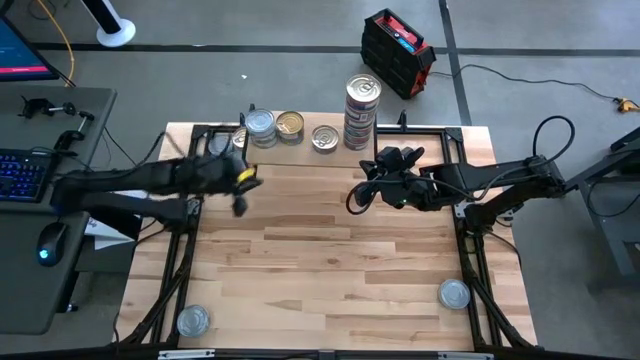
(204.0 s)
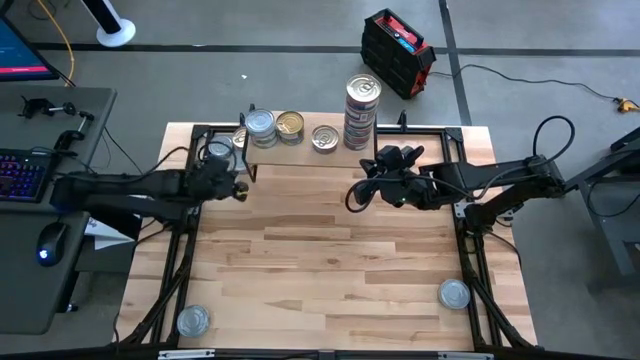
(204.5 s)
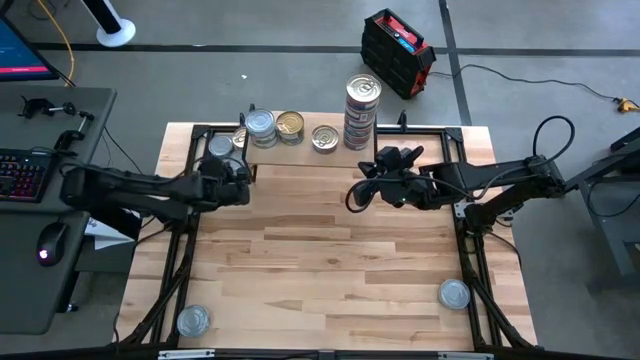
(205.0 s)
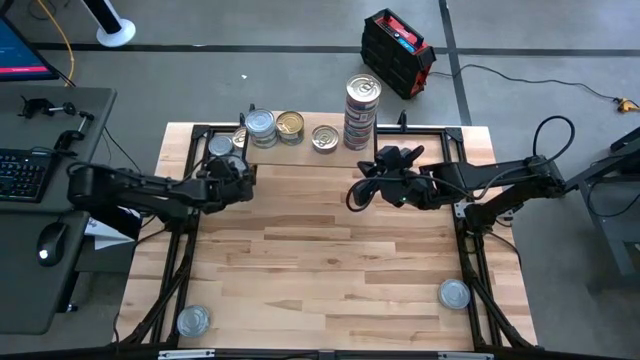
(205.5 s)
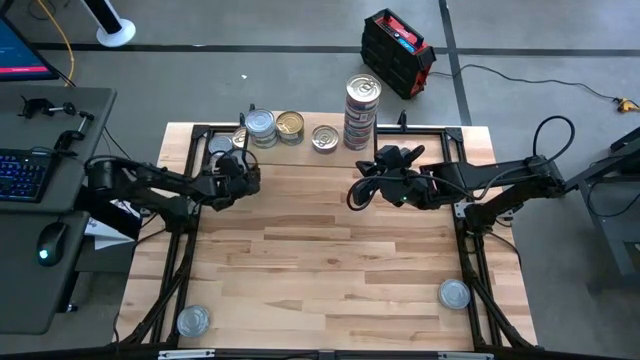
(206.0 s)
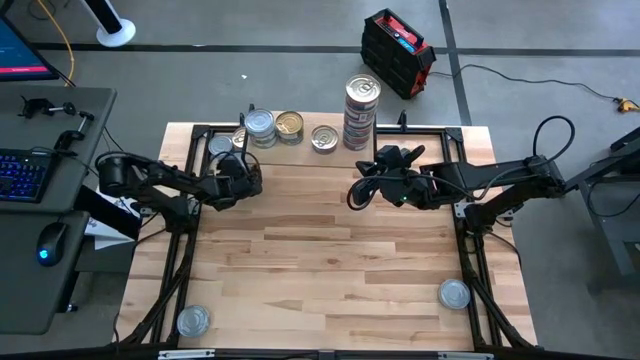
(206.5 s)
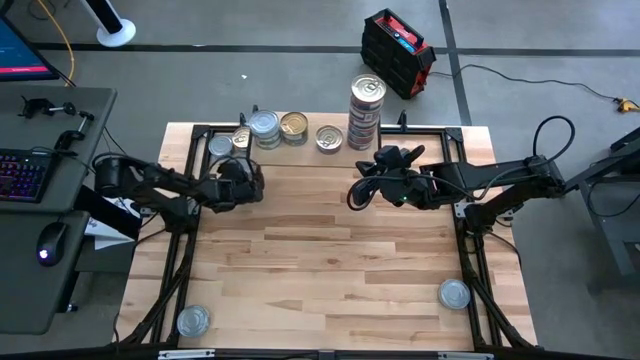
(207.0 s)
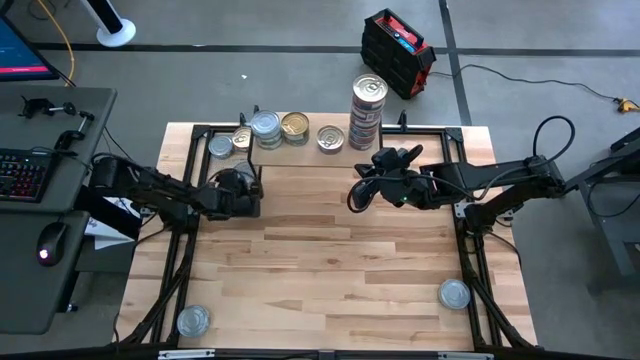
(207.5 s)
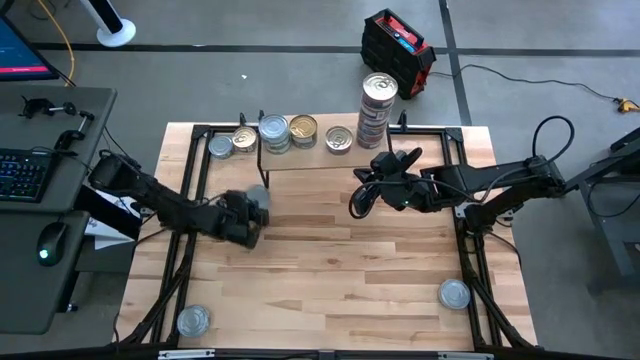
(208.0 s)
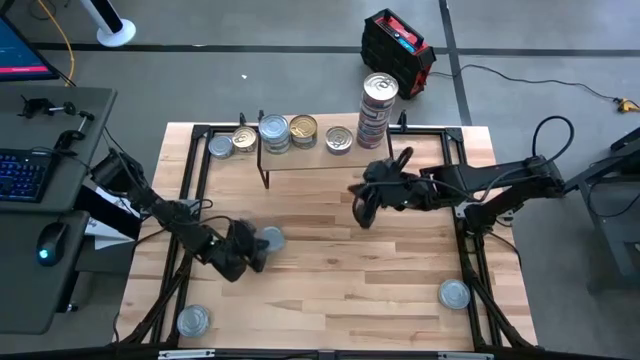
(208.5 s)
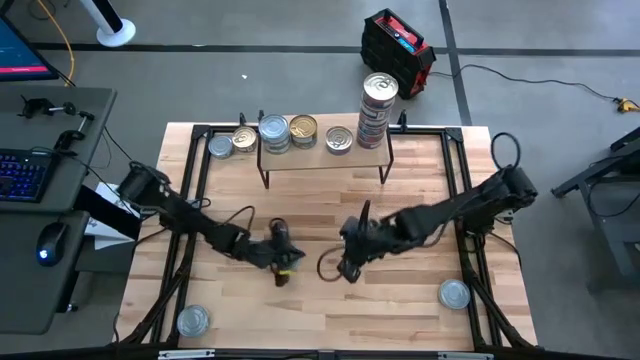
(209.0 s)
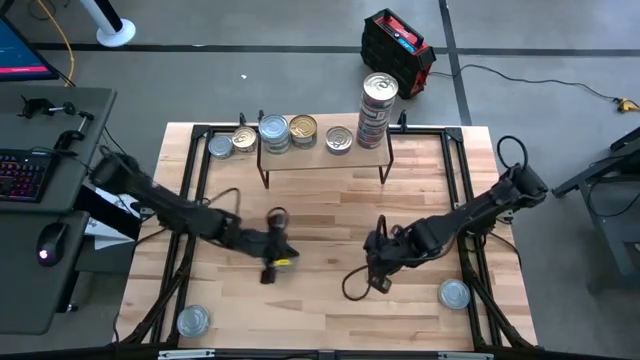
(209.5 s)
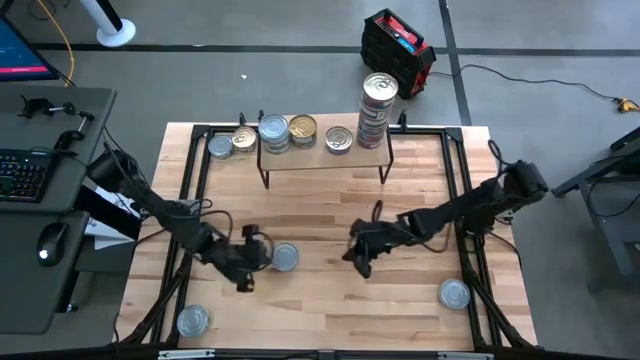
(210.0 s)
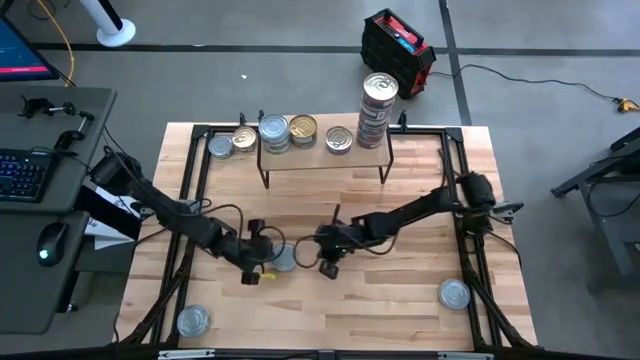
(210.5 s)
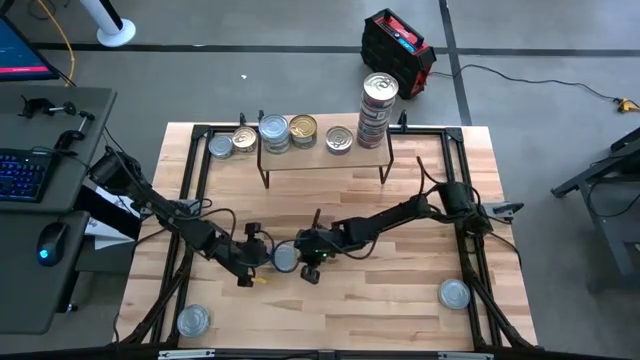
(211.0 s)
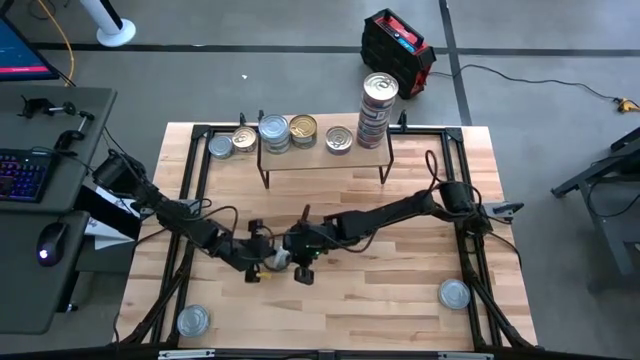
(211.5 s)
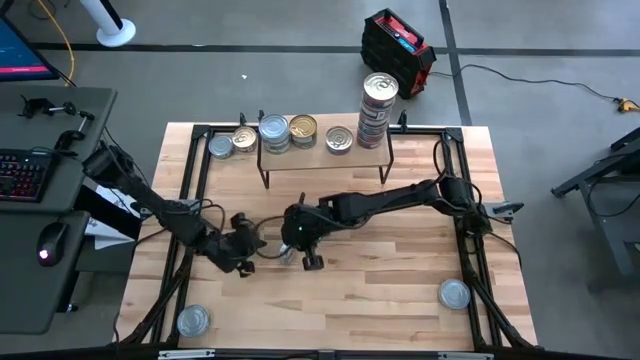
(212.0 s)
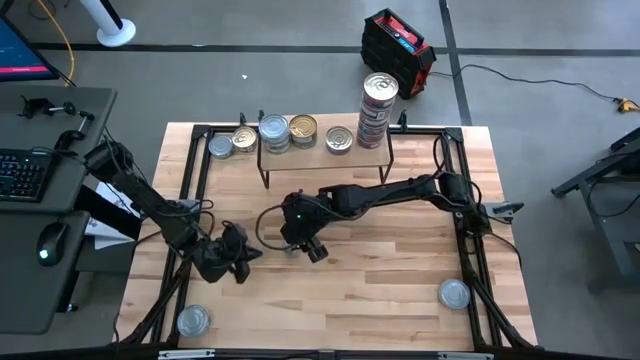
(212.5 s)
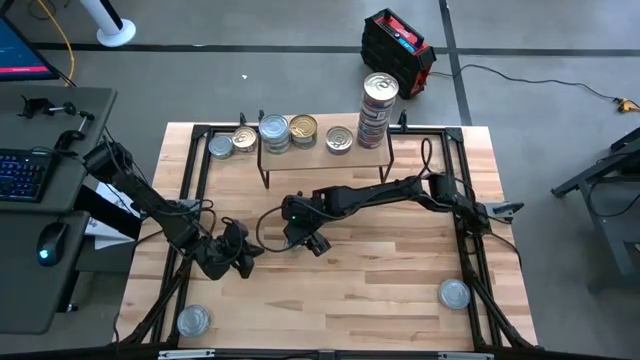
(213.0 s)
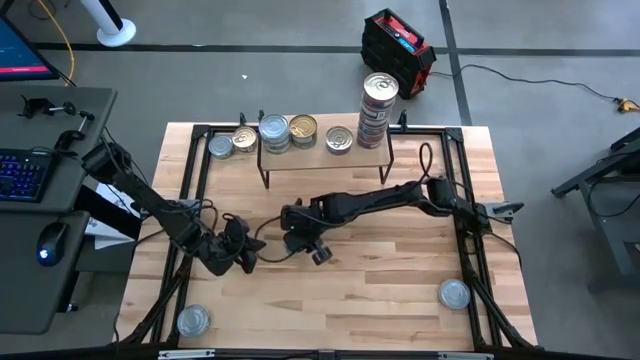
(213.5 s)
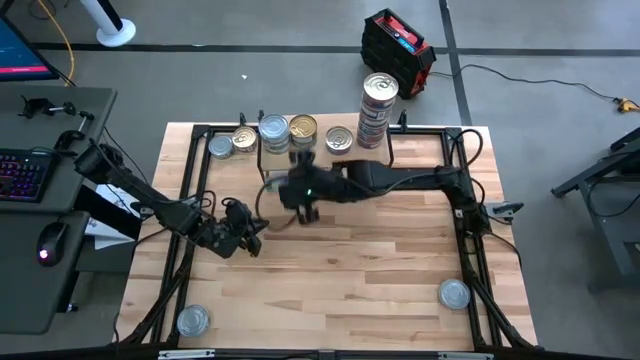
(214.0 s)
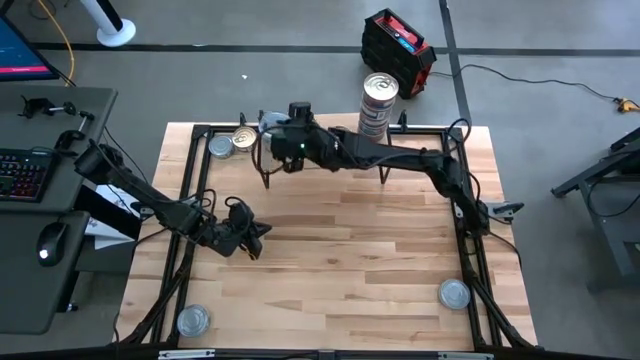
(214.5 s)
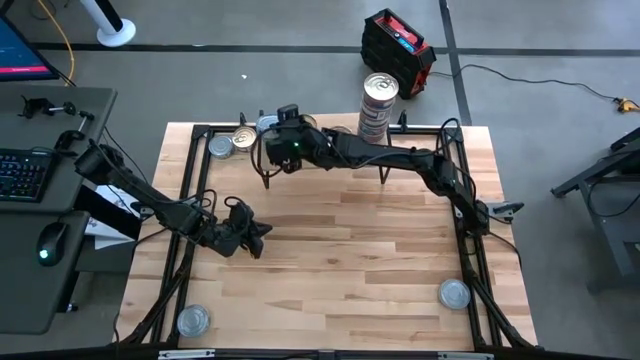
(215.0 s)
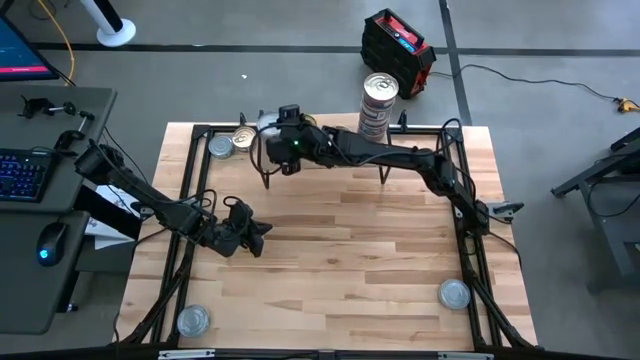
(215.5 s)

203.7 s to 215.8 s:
Task: Stack canned seafood by type on shelf
Stack the green white tuna can on top of the other green white tuna cans on the shelf

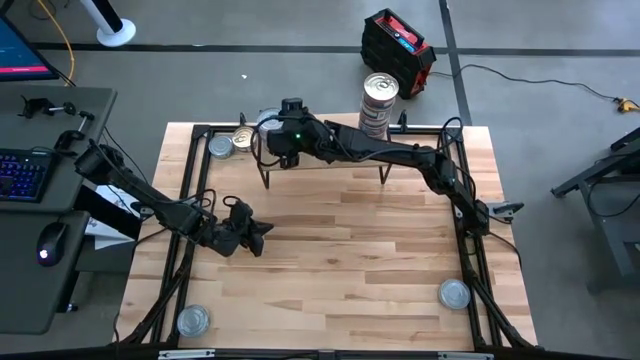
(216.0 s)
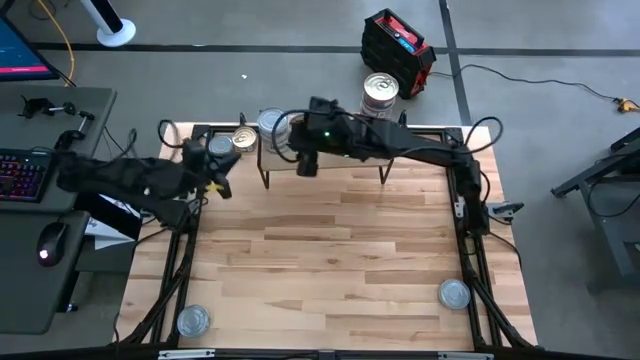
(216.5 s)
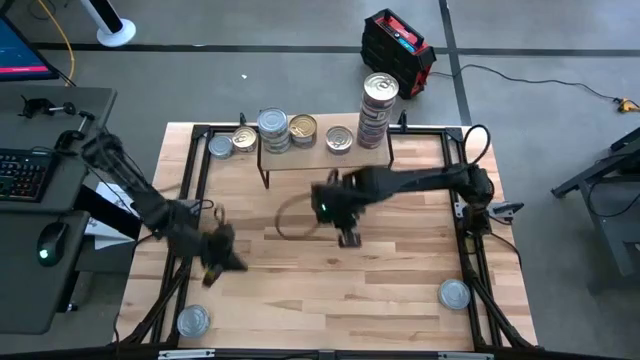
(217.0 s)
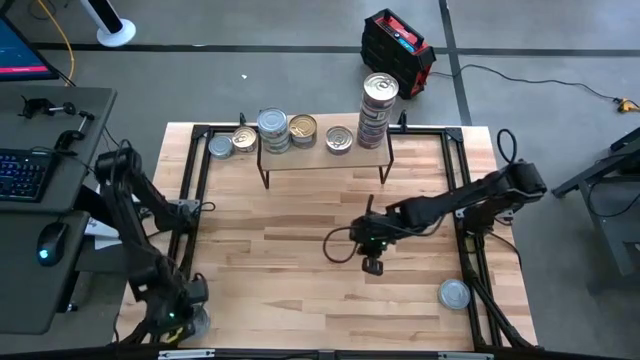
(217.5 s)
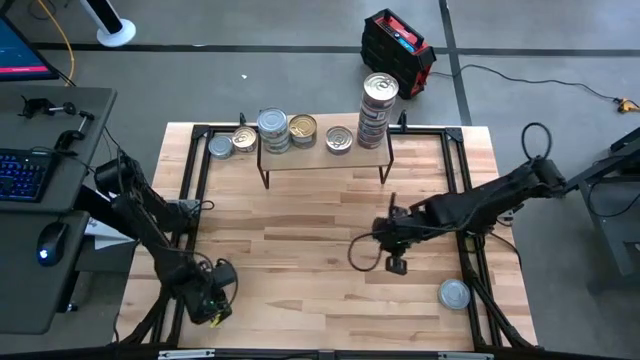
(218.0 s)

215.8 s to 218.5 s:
Move the green white tuna can closer to the center of the table

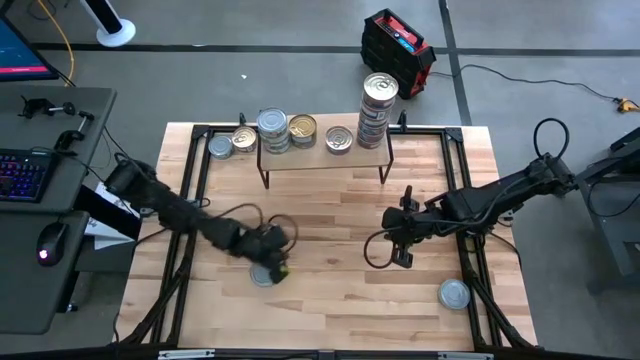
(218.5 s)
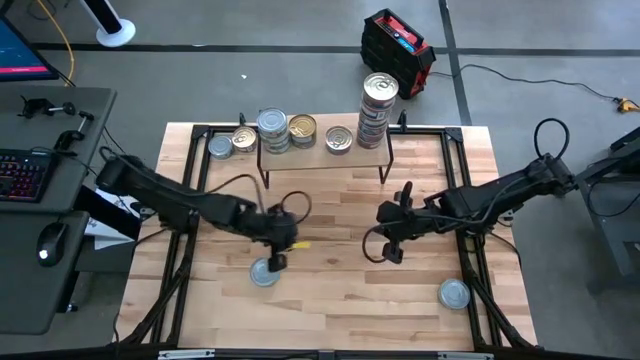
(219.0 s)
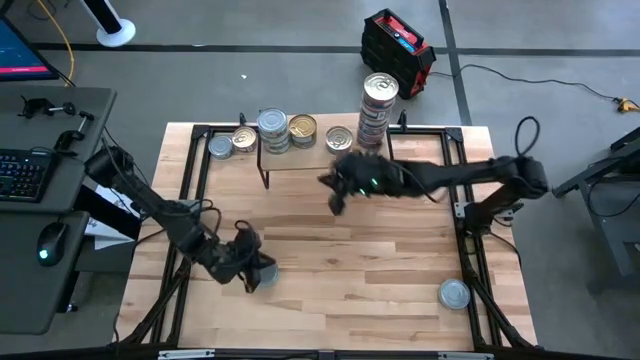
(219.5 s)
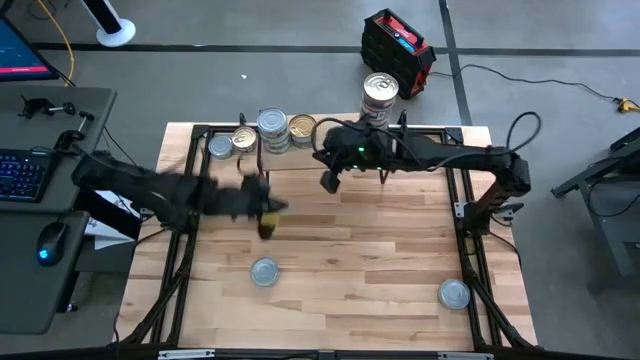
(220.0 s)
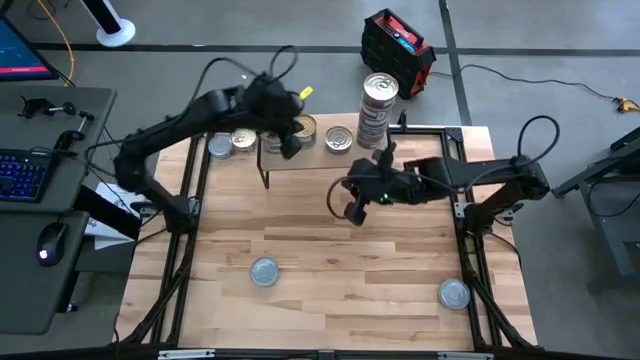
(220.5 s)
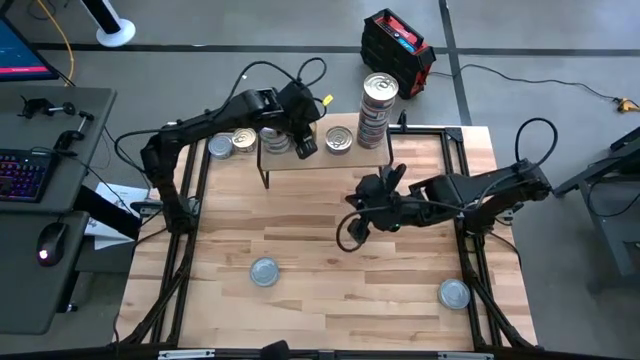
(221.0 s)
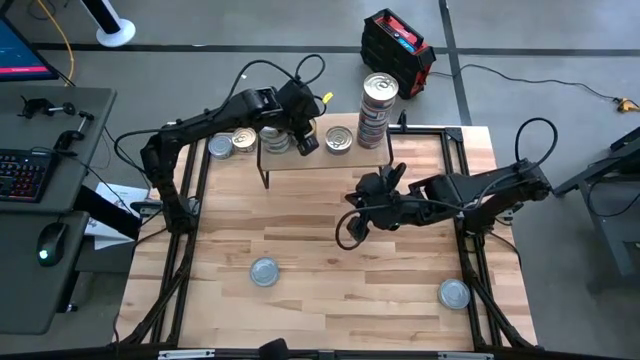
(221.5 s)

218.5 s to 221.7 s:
Adjust the green white tuna cans on the shelf

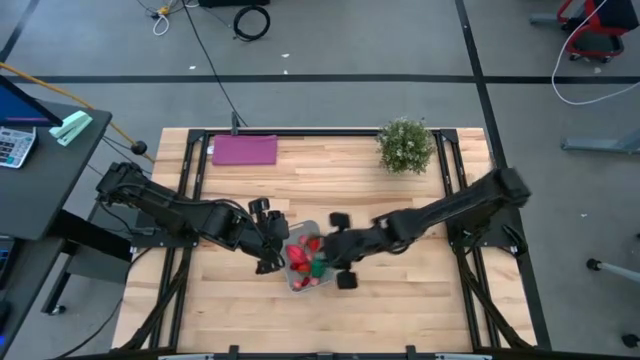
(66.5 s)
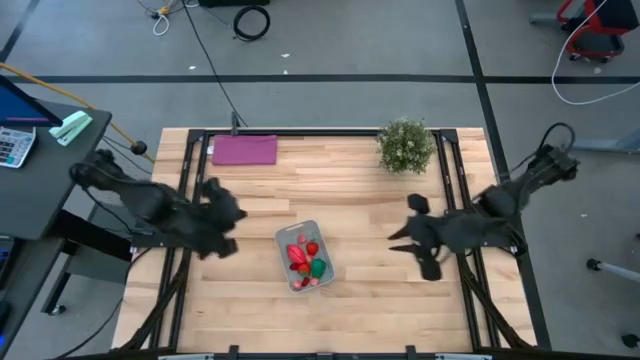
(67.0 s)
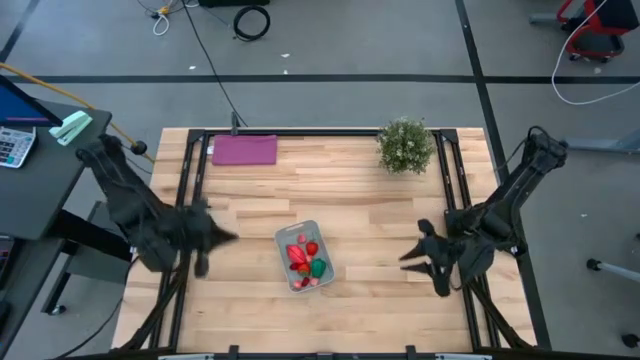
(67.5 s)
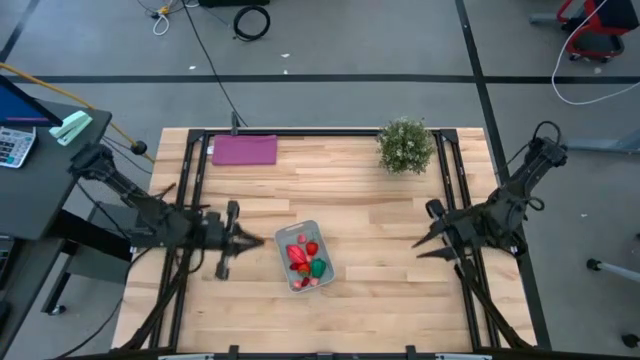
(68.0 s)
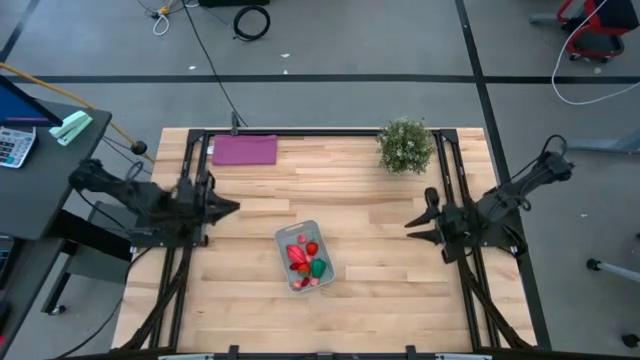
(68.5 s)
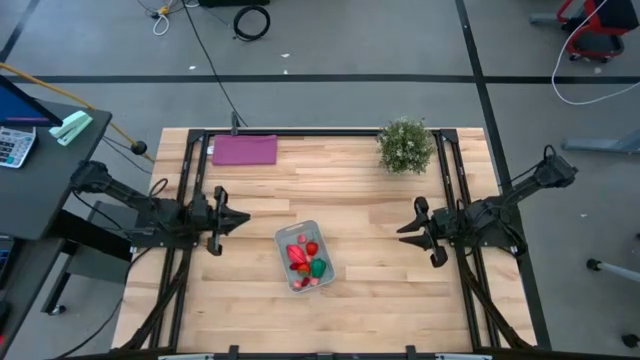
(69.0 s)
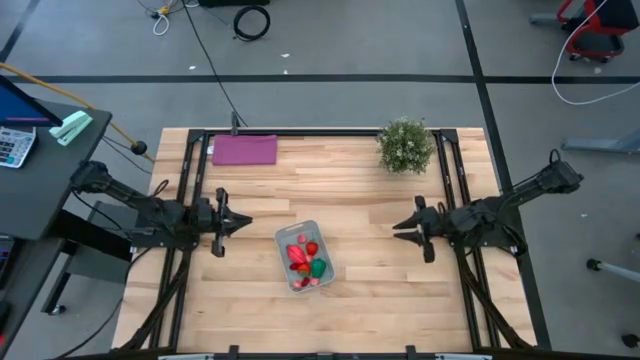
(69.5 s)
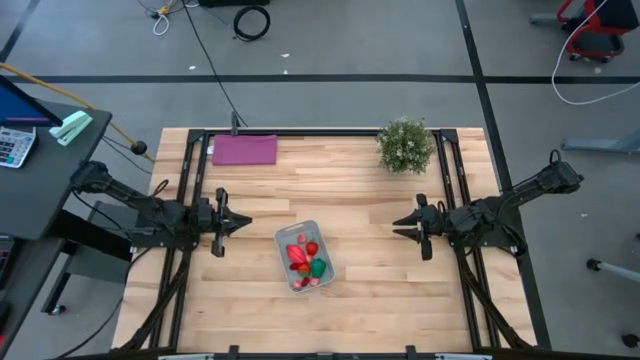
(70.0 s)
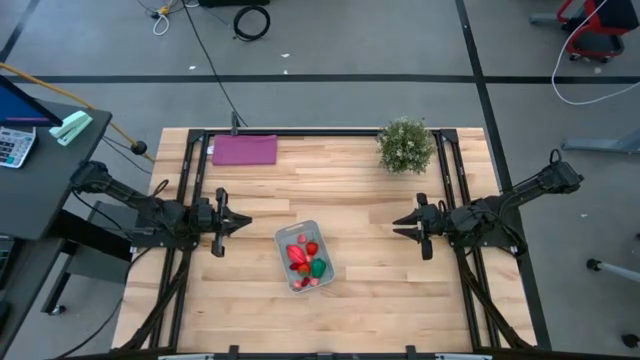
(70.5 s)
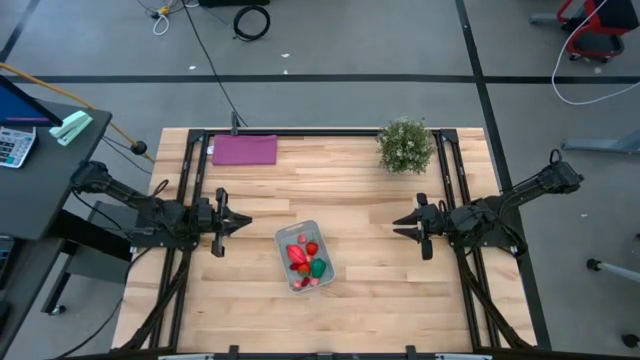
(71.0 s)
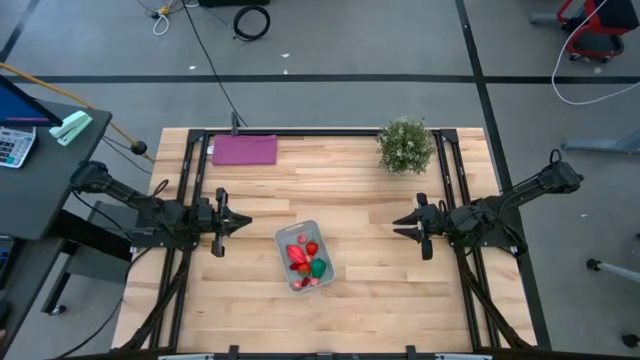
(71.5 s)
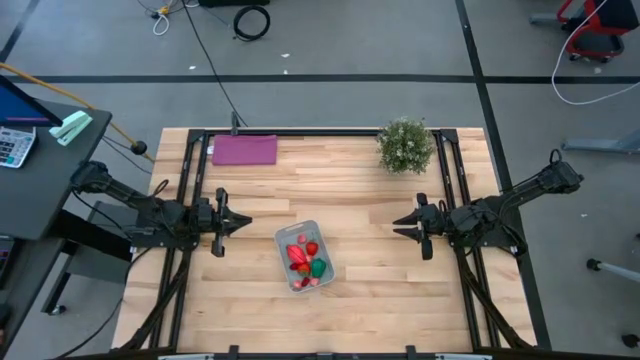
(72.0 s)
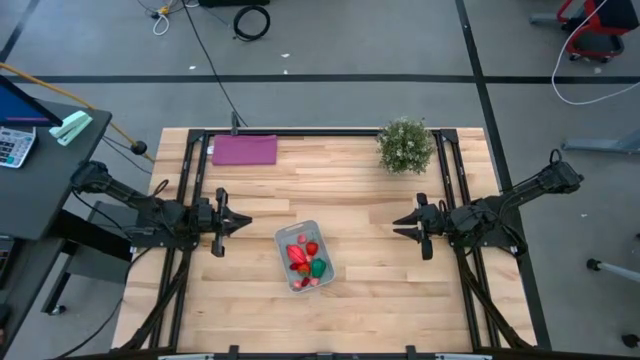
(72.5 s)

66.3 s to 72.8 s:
Task: Pick and placing Produce into tupperware
Return to Home Position
